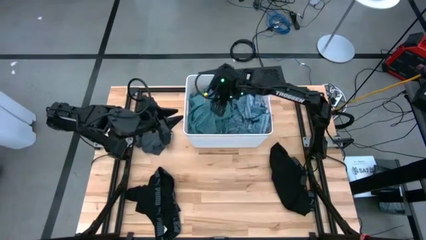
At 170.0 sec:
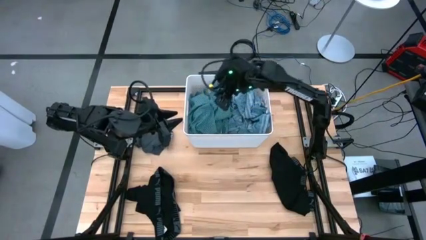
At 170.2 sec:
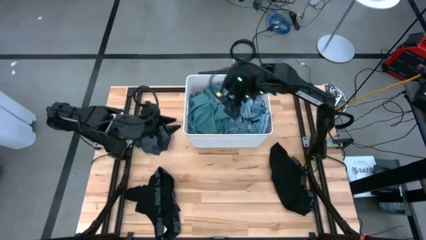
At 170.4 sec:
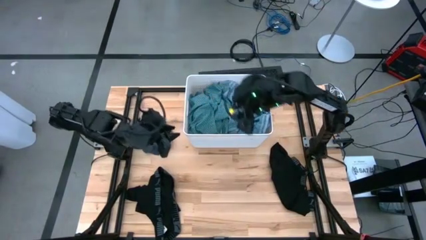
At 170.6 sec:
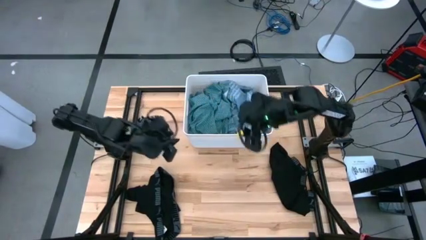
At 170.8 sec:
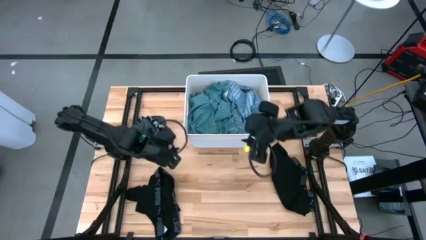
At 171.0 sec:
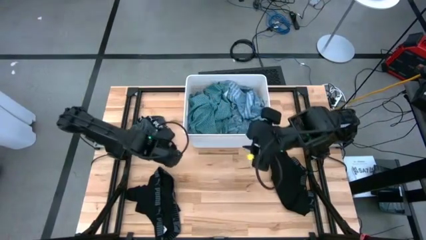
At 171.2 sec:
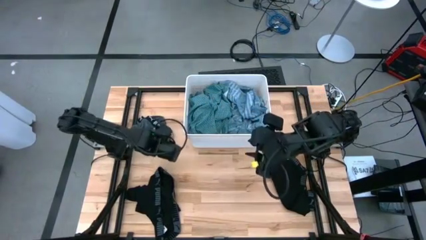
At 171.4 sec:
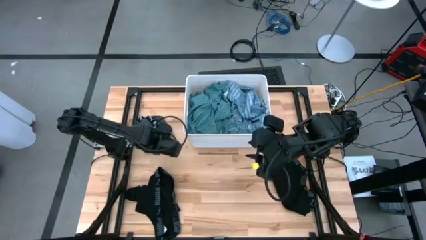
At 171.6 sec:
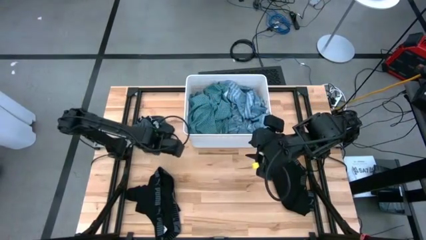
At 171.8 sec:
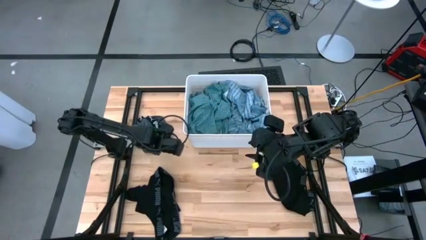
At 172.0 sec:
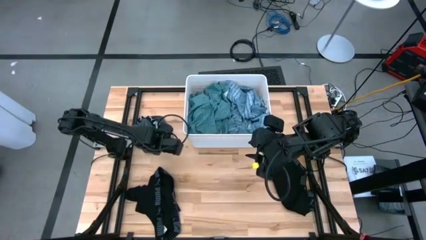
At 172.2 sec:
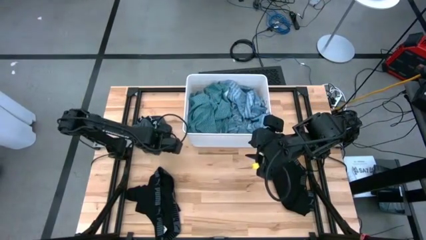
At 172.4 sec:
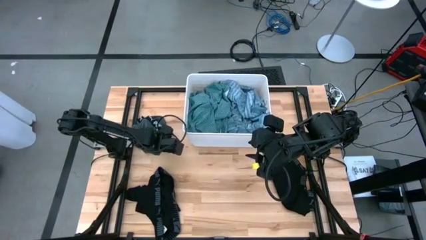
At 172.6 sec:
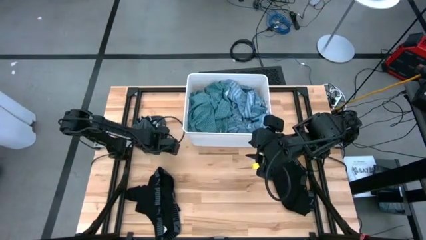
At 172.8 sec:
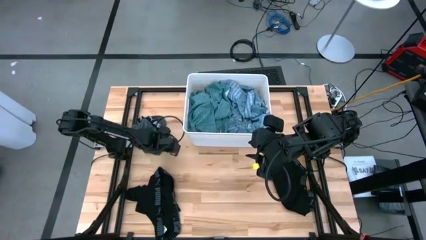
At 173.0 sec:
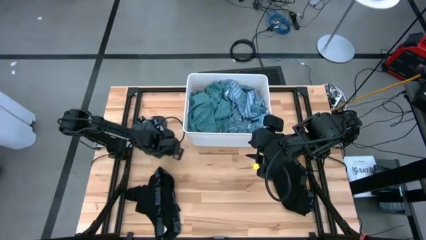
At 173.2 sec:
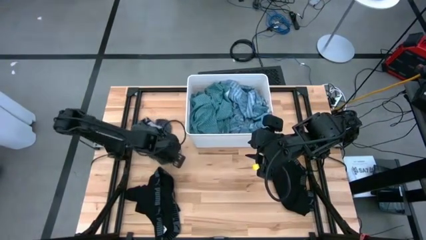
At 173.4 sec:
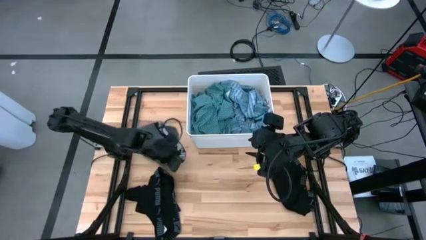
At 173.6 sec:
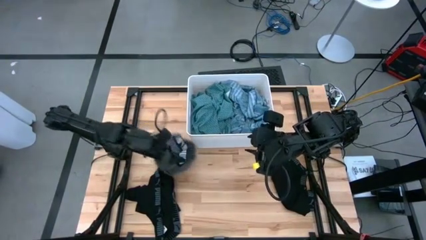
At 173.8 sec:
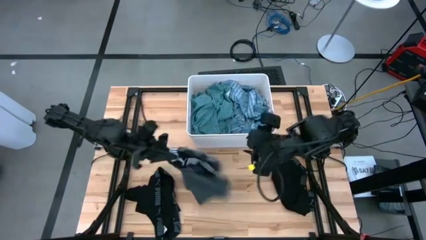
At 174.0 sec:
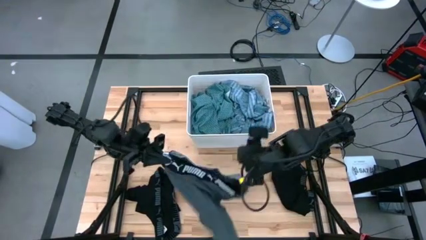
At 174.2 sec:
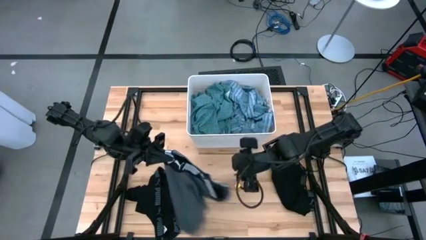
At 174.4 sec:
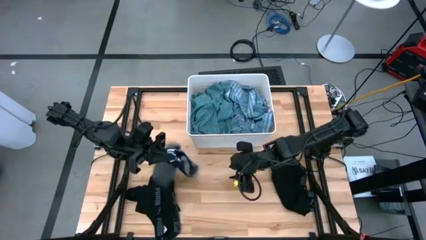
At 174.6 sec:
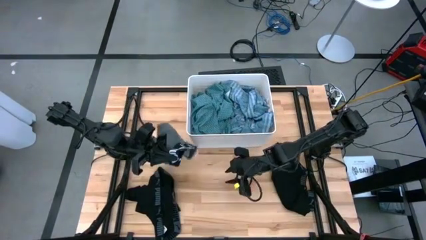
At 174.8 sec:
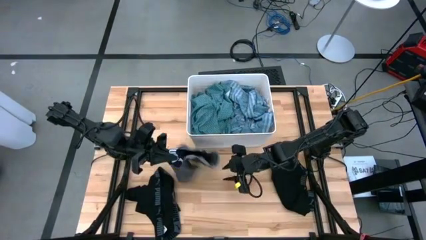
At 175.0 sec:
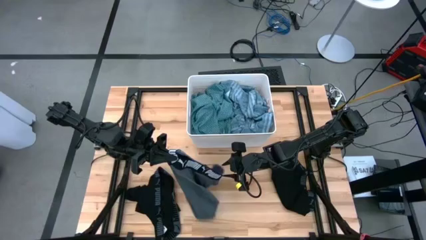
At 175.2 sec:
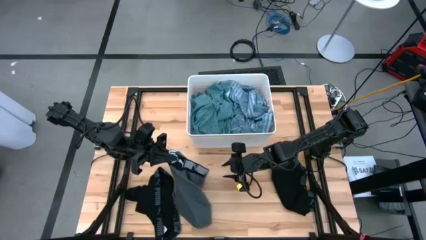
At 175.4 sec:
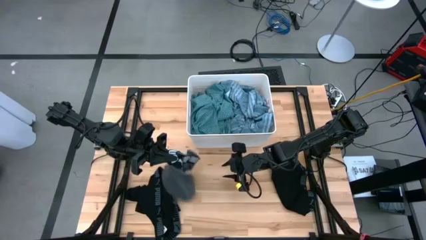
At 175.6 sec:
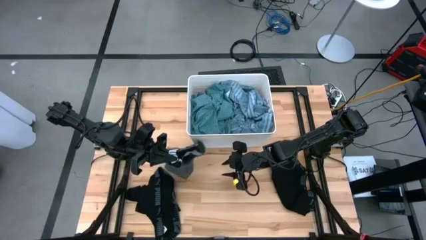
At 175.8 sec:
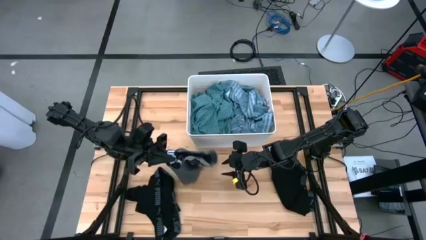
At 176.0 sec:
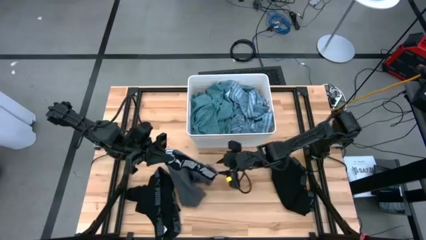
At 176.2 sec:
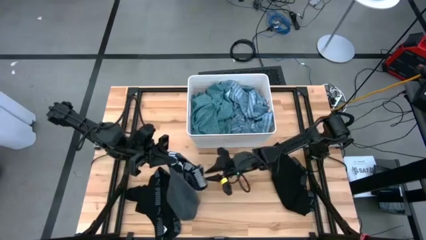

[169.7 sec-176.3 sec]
Task: Sort clothes
Put the gray underwear into the white laundry organizer

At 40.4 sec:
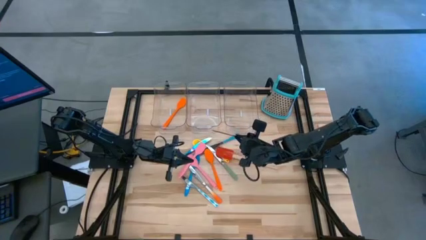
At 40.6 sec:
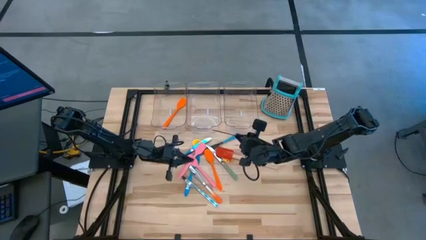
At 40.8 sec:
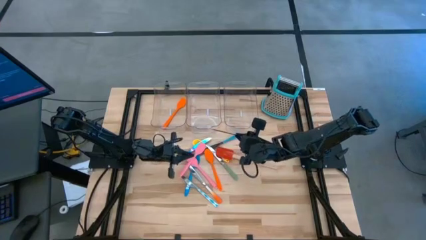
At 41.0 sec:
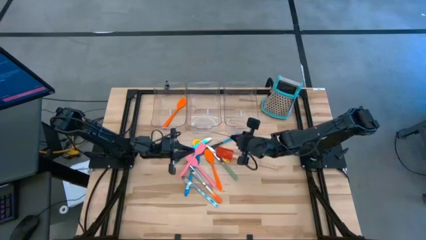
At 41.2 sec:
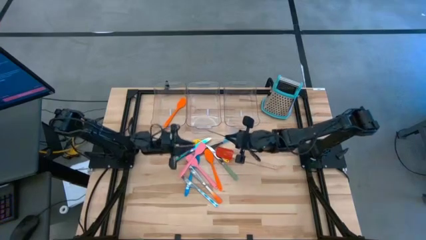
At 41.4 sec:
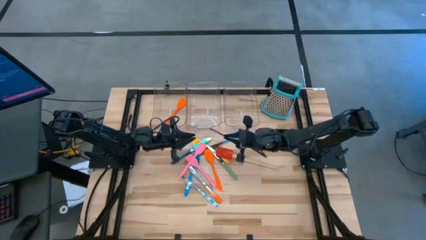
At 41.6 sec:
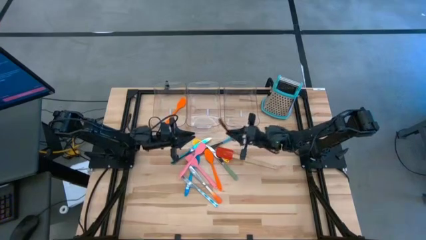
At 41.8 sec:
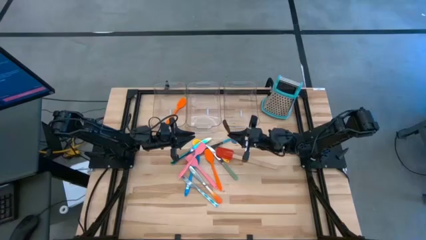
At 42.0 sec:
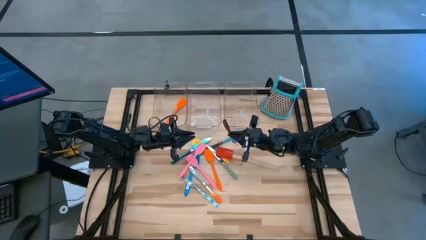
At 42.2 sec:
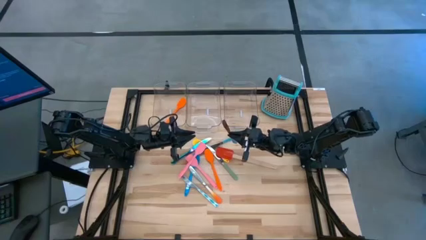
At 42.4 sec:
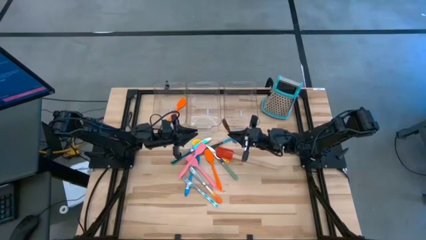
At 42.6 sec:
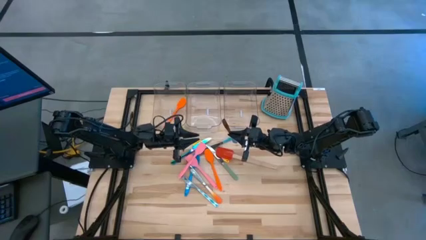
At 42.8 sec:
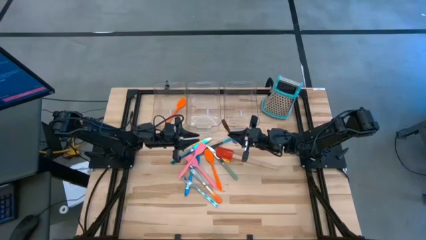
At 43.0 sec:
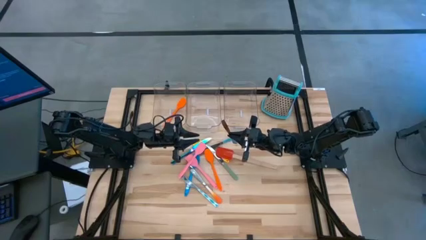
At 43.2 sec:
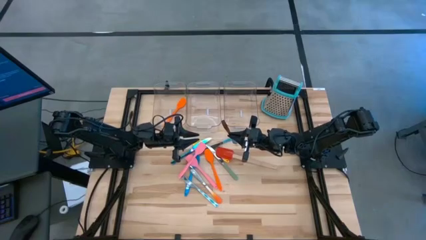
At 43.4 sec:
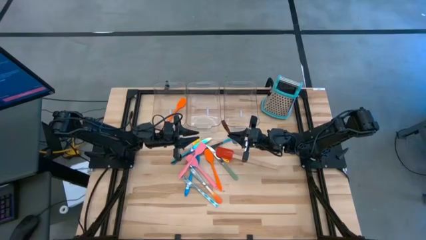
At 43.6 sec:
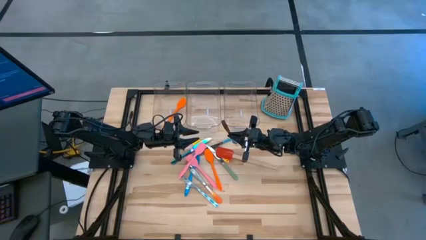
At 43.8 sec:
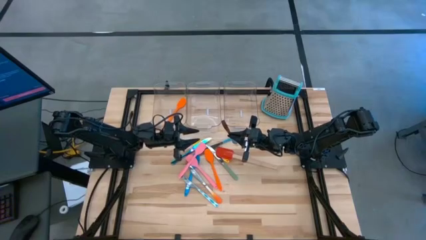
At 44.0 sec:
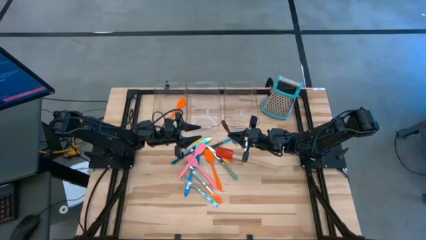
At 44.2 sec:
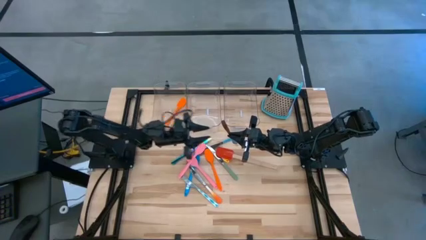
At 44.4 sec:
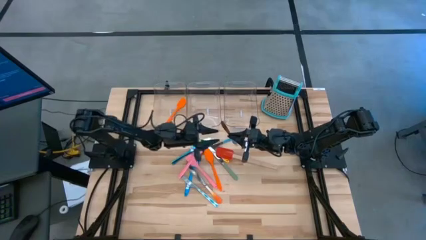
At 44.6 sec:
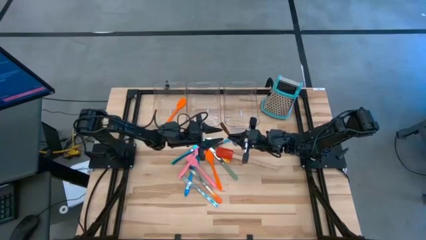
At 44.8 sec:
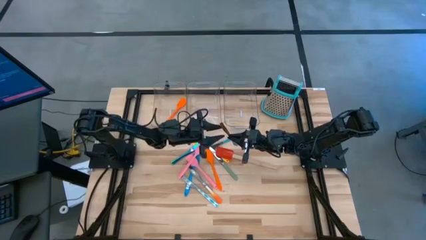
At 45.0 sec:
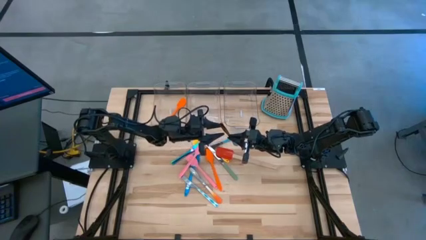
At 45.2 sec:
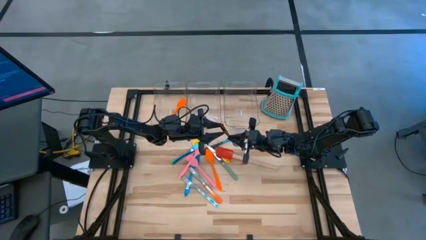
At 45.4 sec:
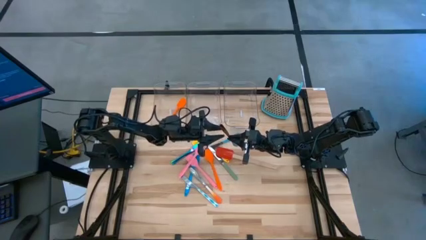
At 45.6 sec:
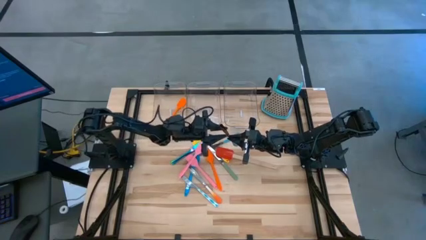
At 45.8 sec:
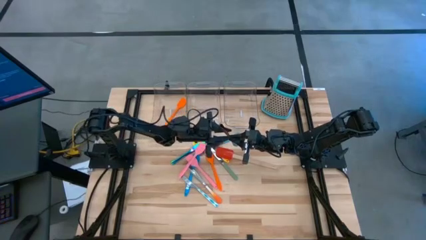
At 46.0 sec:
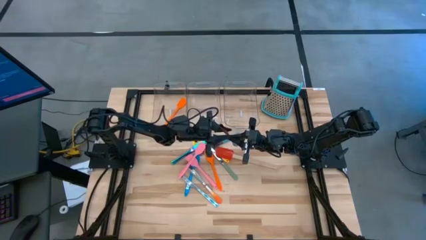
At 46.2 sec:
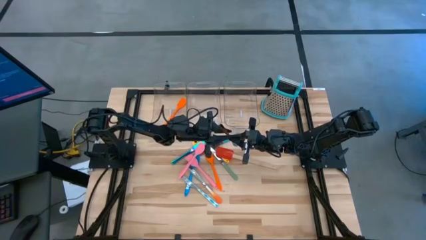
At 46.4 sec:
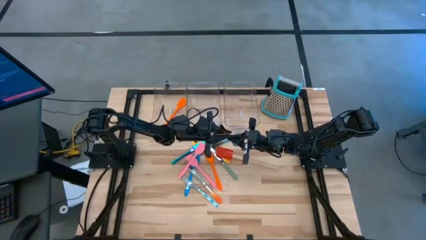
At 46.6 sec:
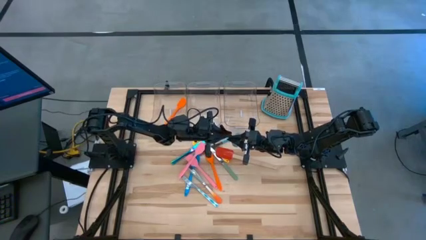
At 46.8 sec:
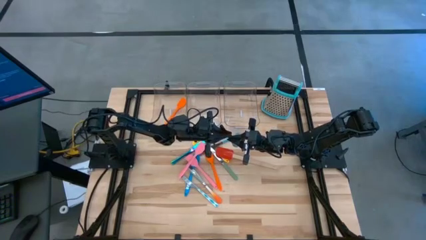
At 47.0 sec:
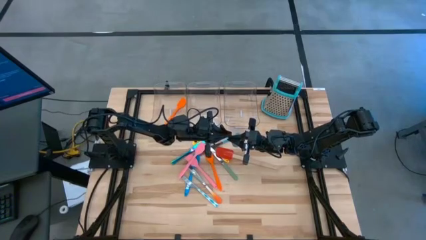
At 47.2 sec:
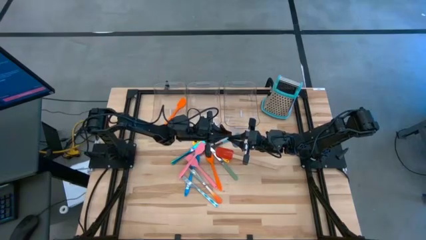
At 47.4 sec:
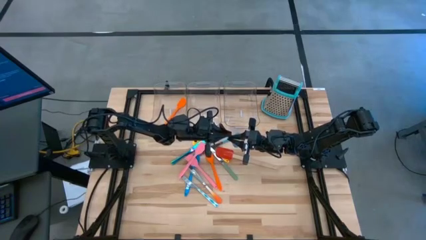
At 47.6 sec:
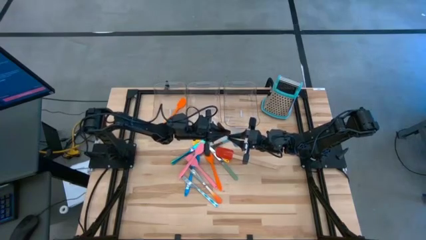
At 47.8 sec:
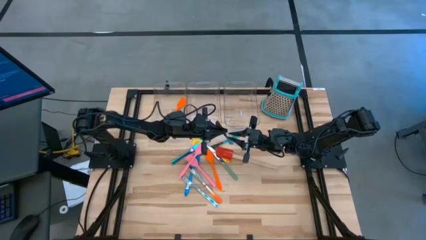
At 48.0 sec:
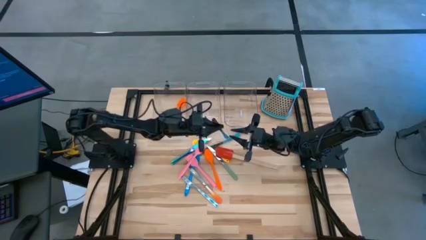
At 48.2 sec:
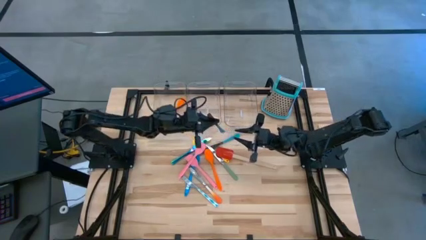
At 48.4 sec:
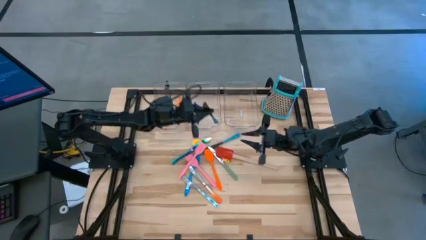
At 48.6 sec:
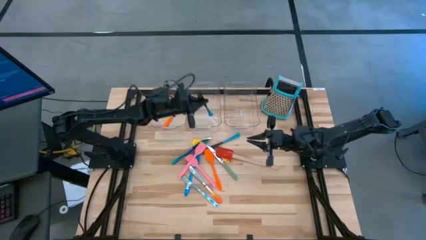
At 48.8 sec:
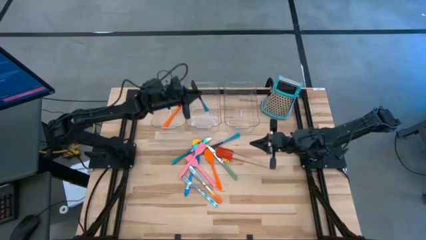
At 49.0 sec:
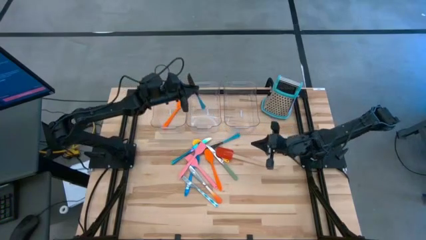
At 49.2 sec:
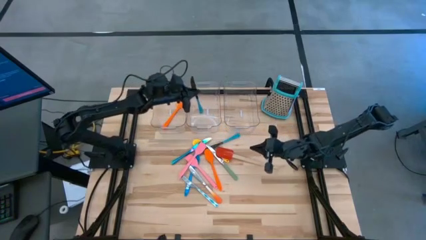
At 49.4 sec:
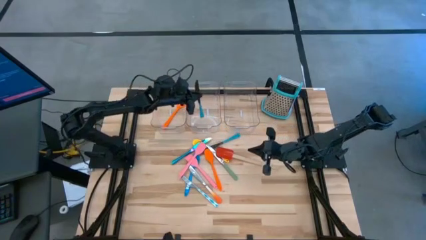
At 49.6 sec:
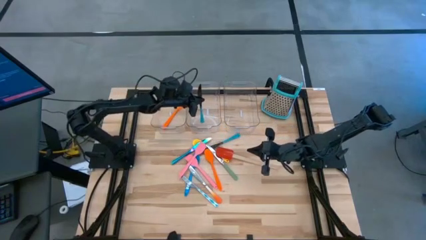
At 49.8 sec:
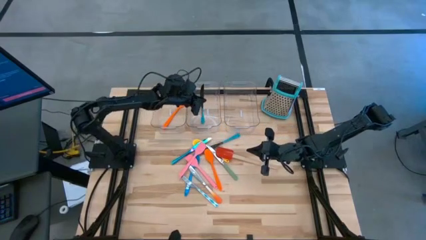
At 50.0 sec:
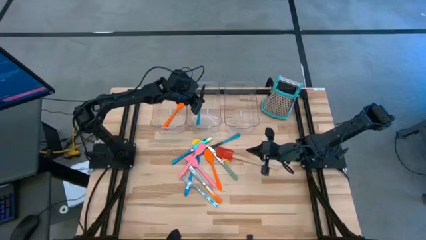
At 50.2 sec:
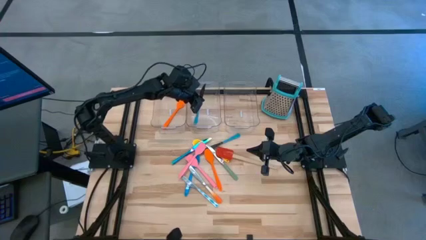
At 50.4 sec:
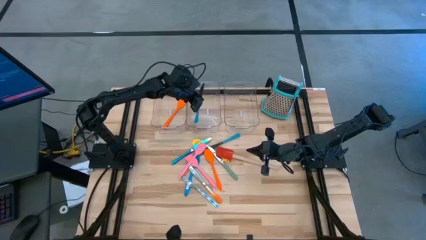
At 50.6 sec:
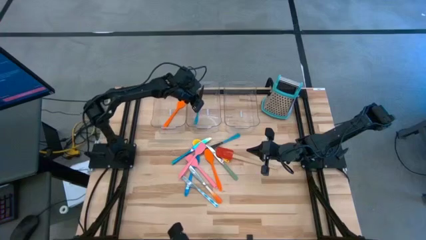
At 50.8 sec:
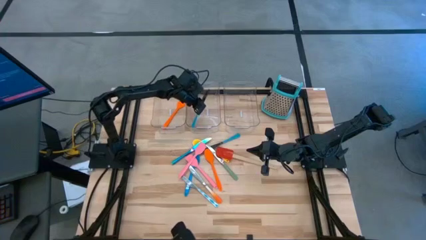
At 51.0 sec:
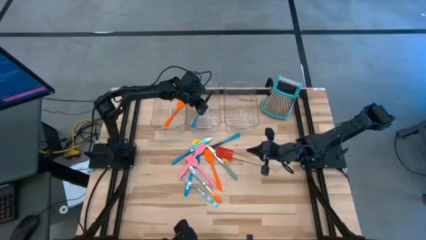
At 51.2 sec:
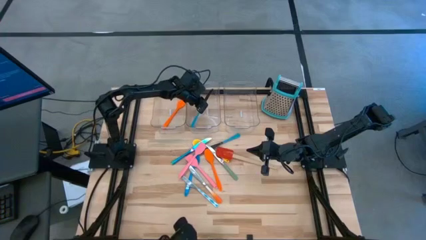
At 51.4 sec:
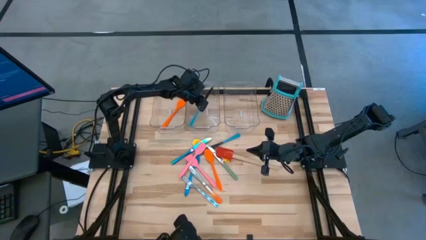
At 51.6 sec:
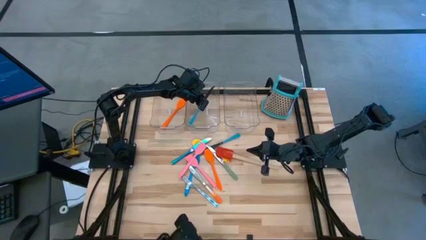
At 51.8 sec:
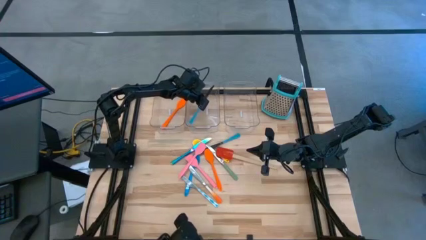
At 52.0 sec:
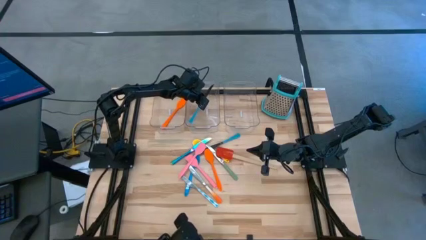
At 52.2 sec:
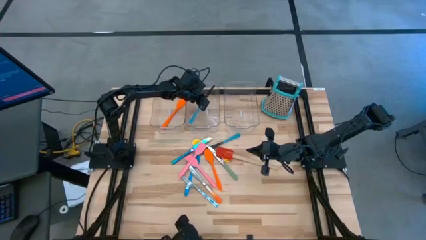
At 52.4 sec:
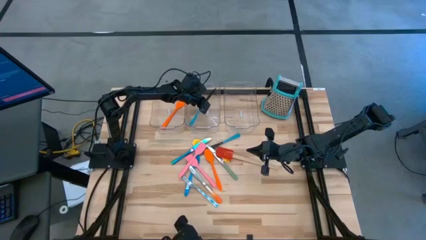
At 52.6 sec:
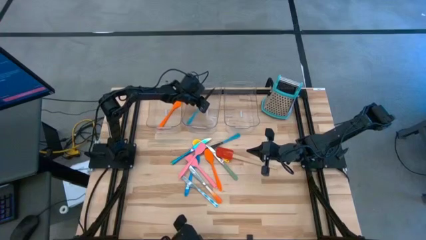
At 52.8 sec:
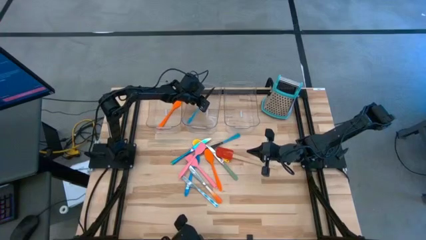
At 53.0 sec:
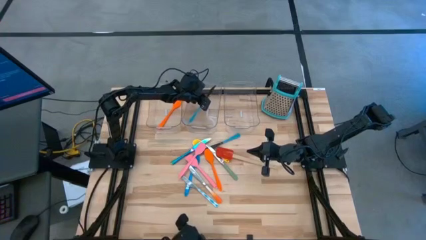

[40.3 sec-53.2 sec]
Task: Pick & Place Kitchen Items
Put the bottom blue knife into the middle transparent bin
